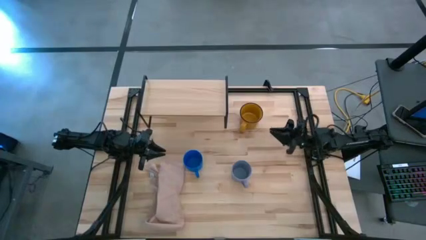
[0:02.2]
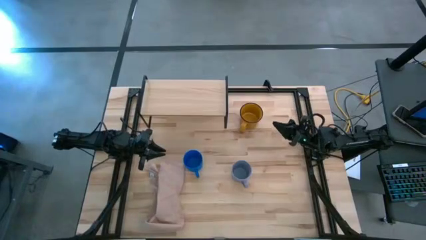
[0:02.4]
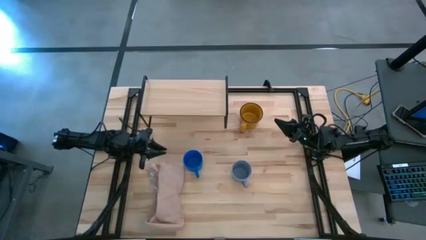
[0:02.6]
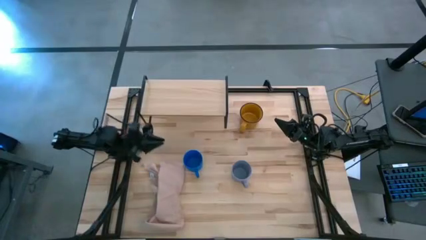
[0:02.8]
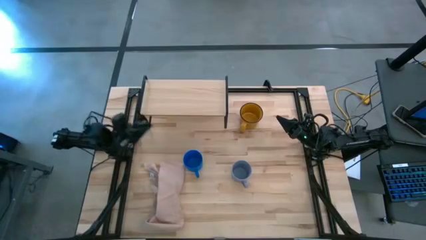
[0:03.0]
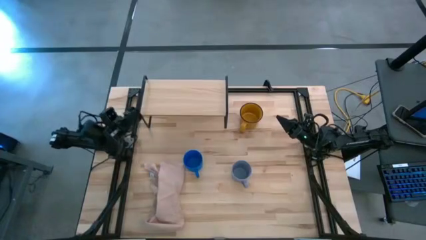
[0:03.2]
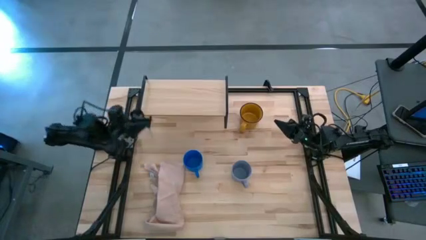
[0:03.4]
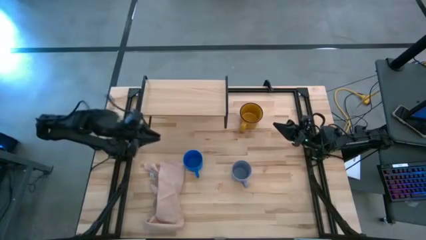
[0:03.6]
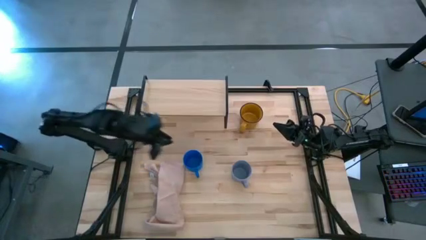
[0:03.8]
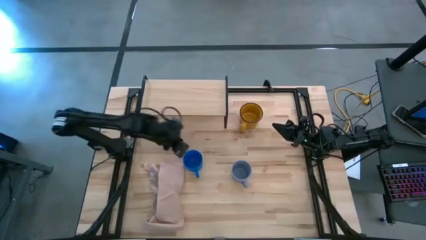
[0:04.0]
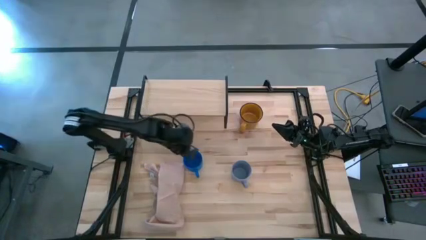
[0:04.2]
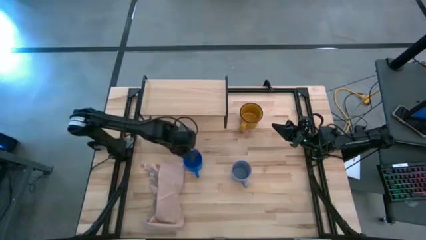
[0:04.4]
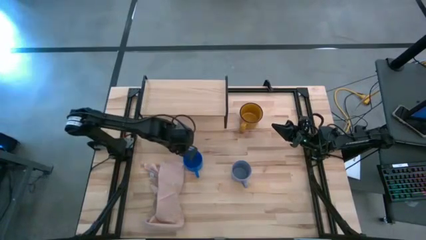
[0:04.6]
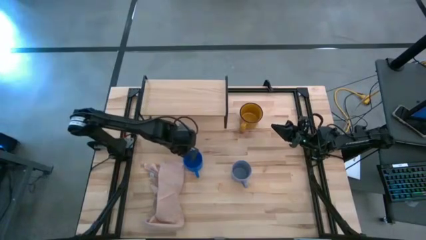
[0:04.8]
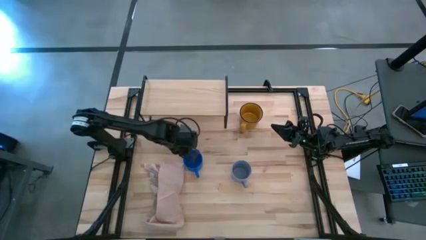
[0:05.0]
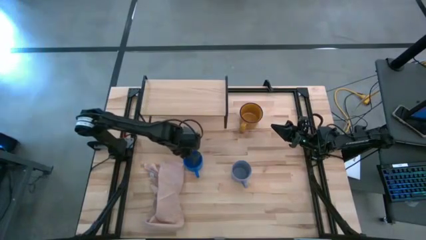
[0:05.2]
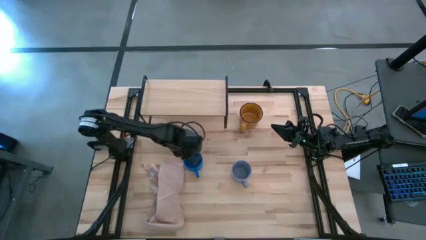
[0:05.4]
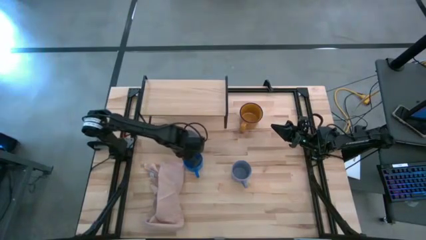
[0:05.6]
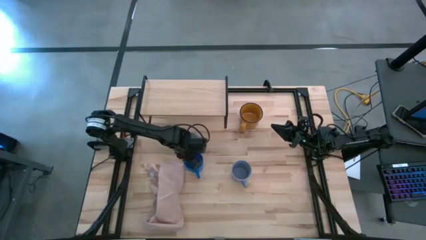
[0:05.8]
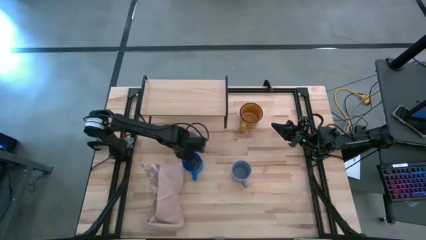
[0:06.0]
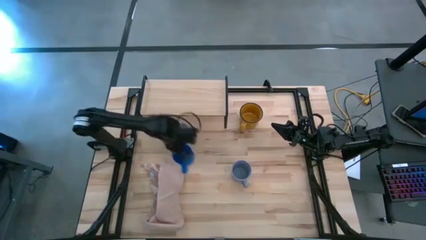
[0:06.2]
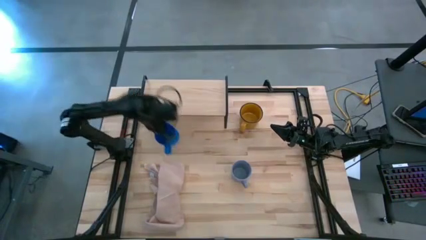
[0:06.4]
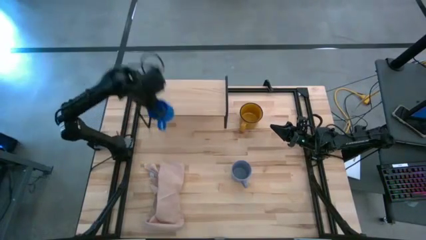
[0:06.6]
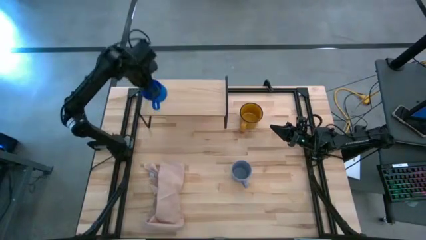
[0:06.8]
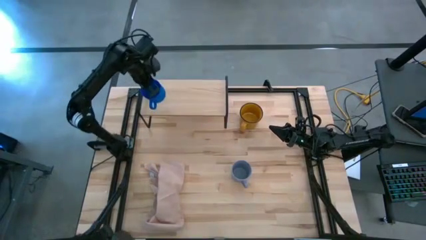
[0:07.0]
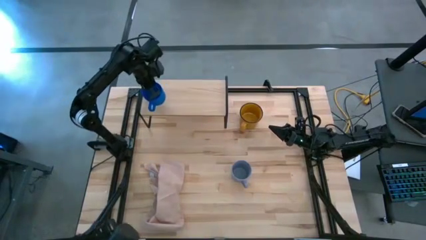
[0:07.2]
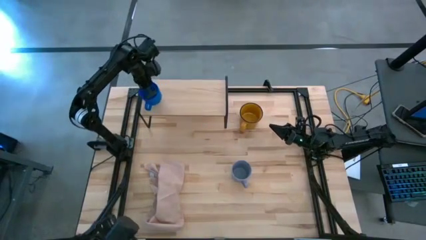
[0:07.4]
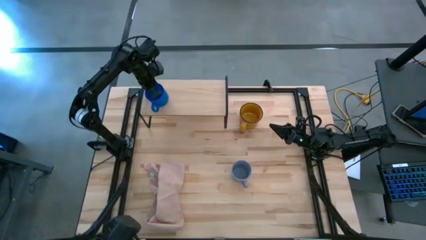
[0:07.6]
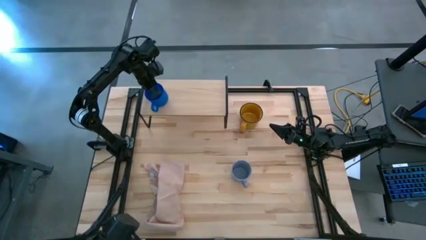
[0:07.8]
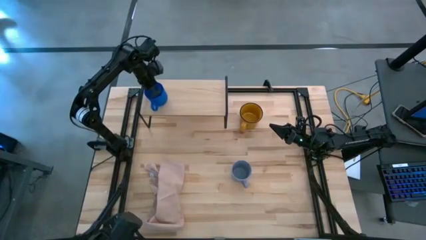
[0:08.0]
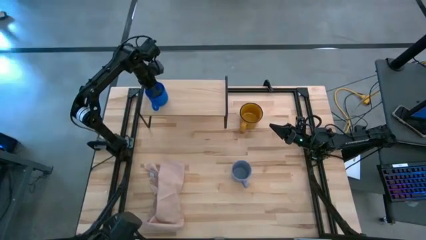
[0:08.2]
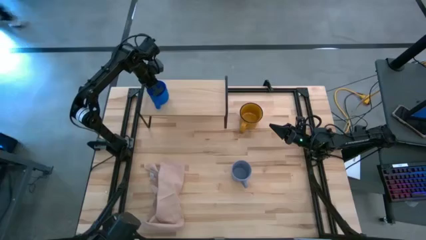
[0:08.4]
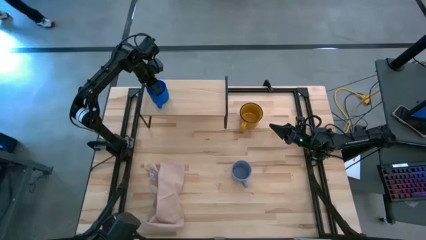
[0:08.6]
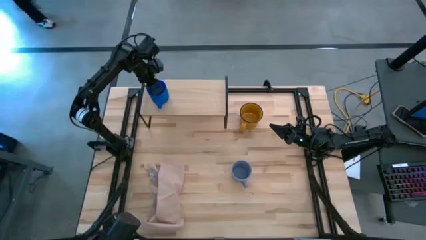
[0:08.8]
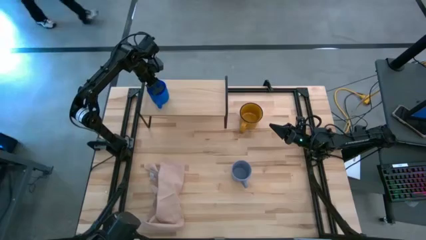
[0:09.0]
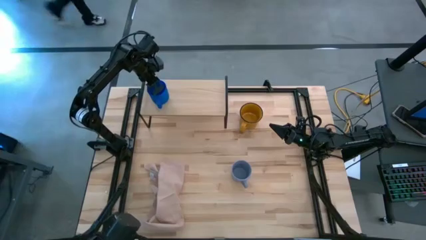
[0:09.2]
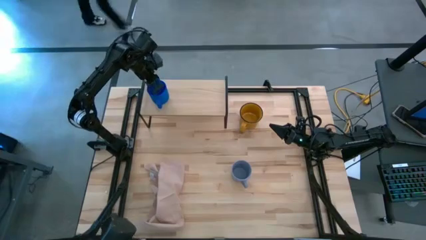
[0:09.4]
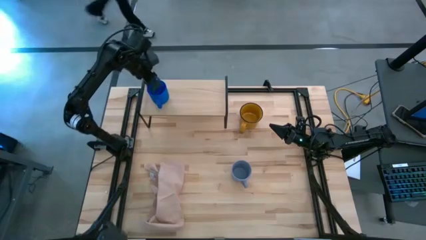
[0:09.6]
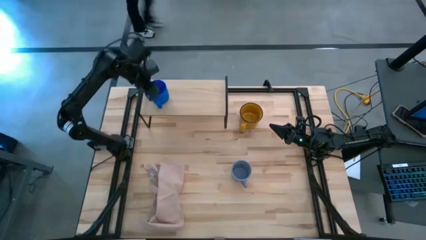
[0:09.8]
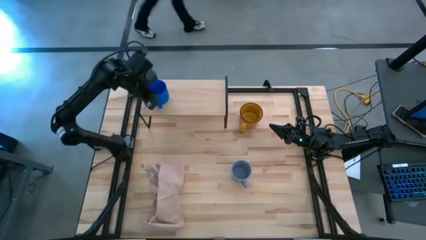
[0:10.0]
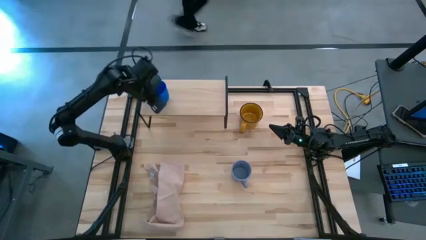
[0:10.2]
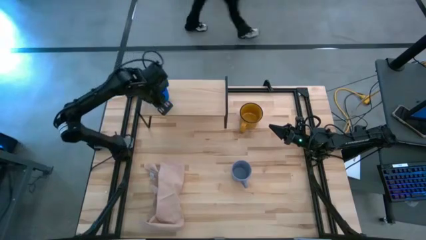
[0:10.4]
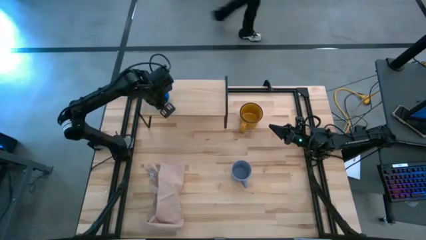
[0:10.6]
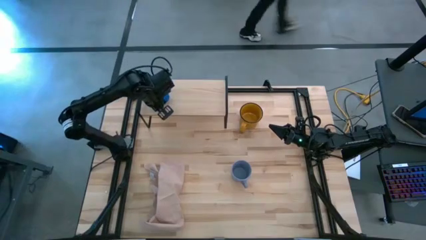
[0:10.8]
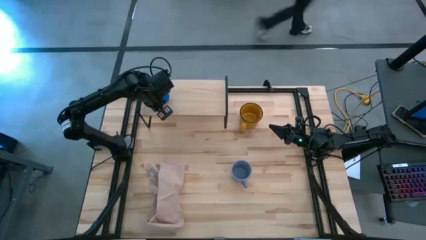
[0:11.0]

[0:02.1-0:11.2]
Task: Stack small to large cups/mugs on shelf
Put the blue mug on the shelf

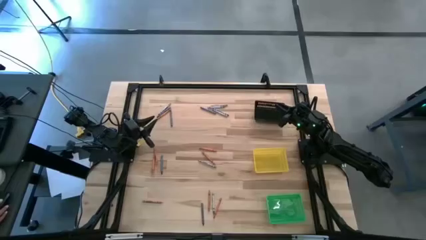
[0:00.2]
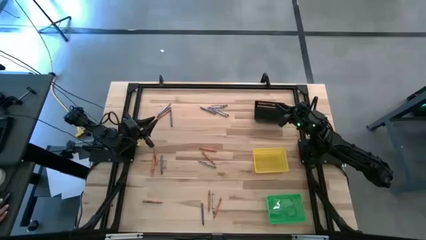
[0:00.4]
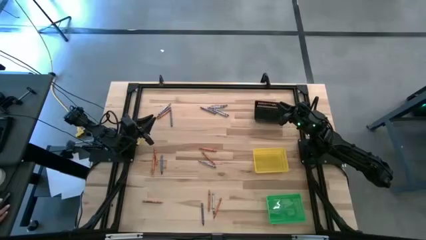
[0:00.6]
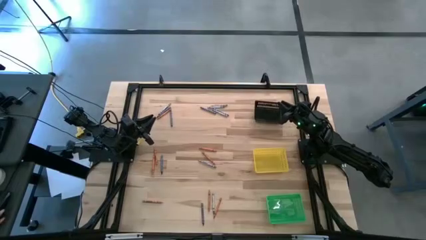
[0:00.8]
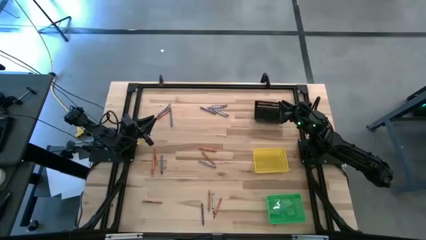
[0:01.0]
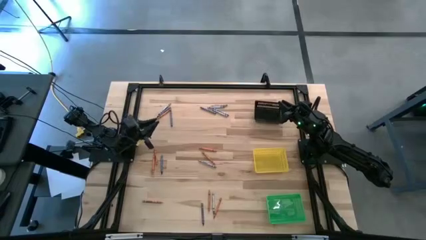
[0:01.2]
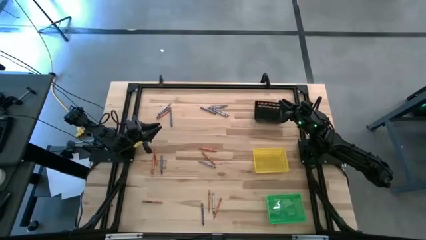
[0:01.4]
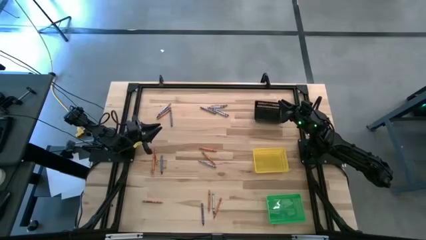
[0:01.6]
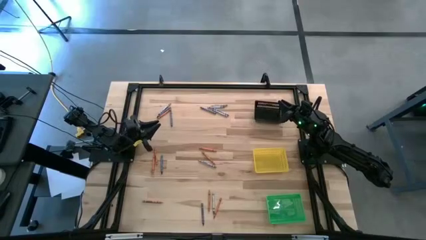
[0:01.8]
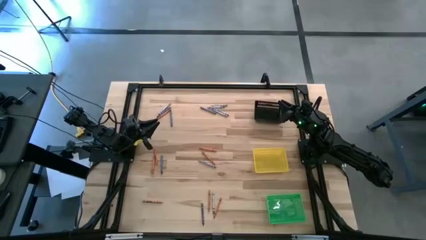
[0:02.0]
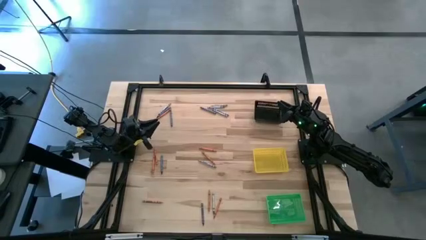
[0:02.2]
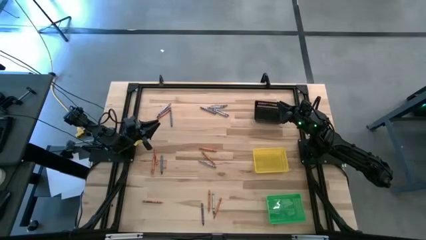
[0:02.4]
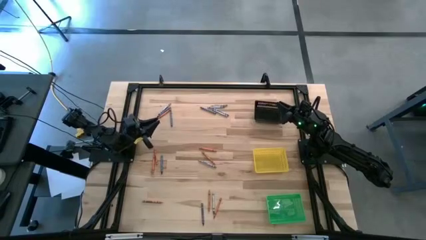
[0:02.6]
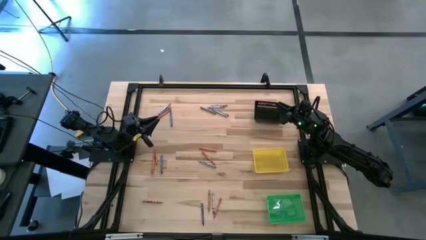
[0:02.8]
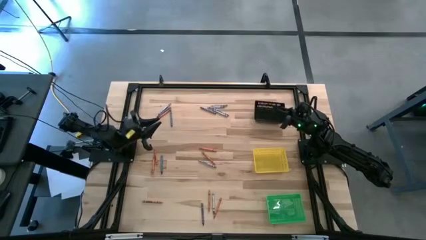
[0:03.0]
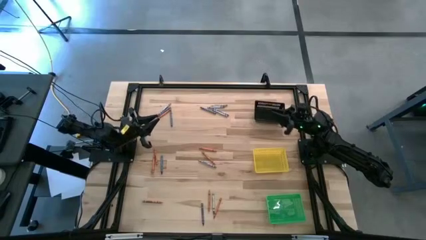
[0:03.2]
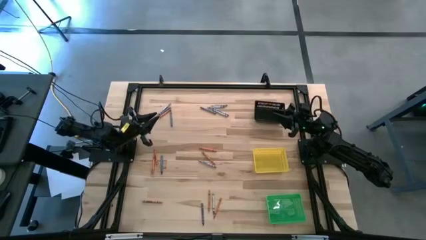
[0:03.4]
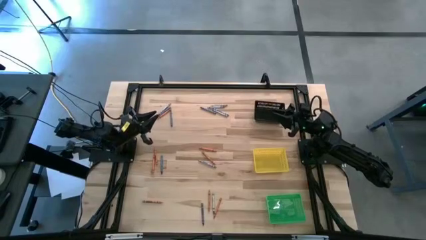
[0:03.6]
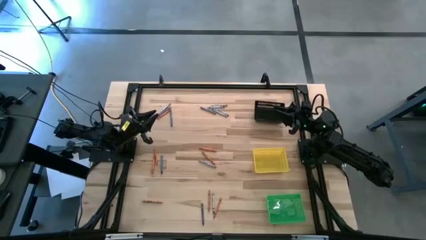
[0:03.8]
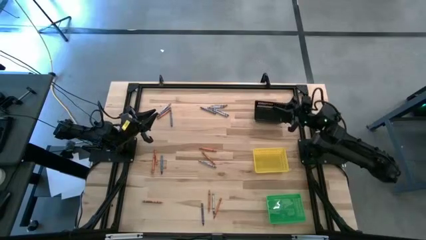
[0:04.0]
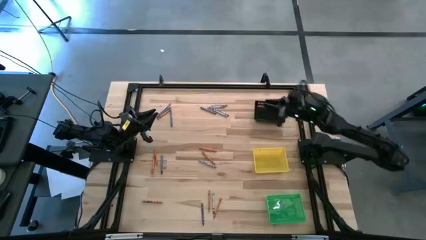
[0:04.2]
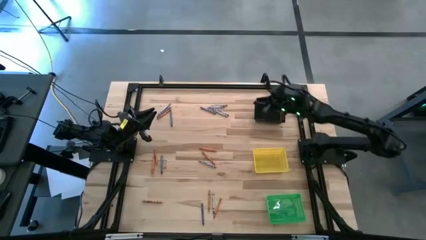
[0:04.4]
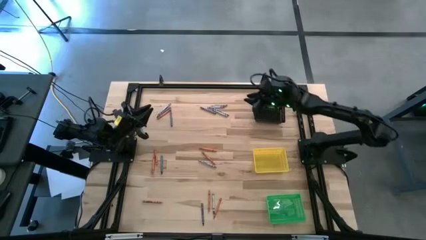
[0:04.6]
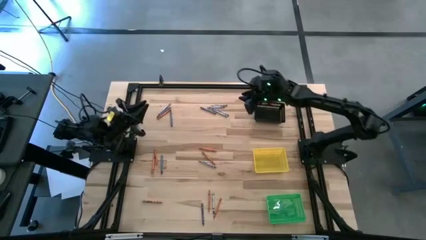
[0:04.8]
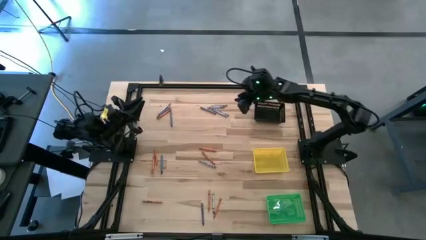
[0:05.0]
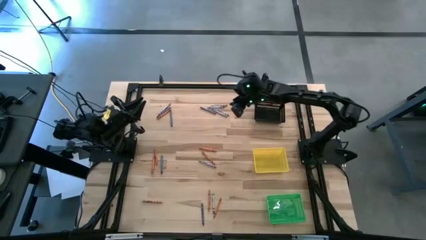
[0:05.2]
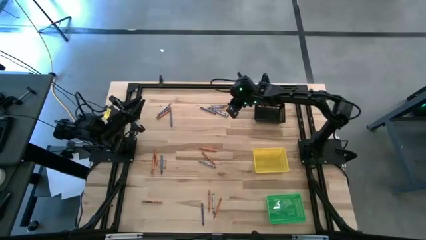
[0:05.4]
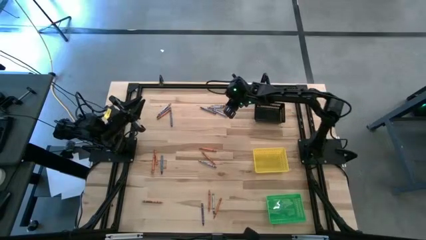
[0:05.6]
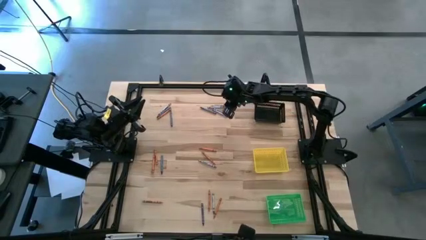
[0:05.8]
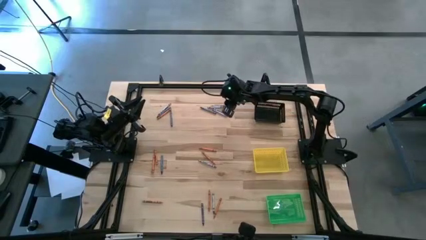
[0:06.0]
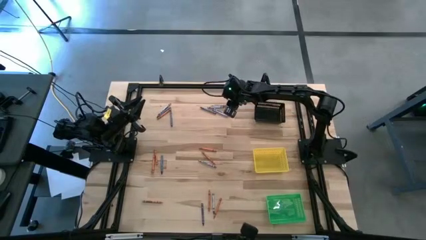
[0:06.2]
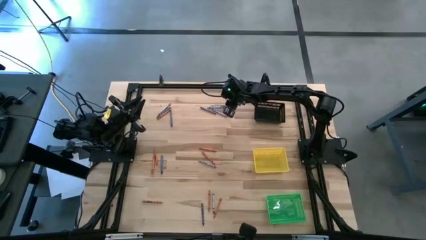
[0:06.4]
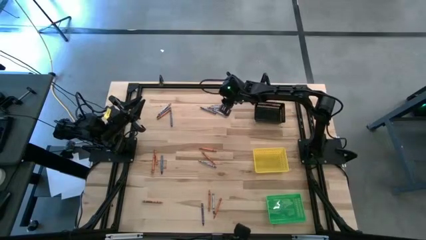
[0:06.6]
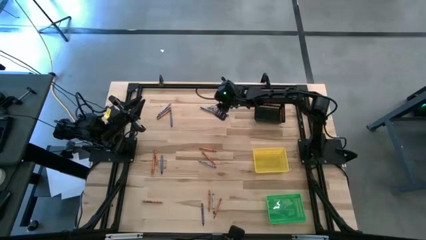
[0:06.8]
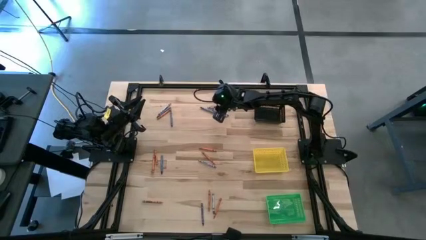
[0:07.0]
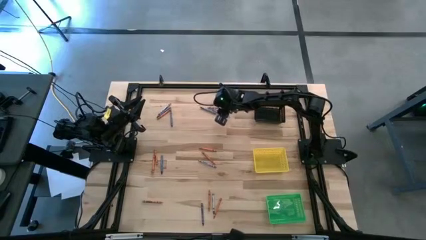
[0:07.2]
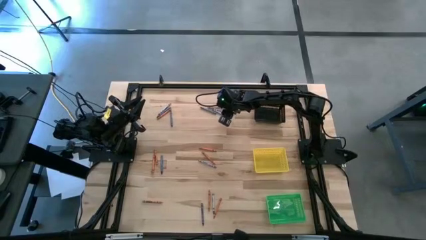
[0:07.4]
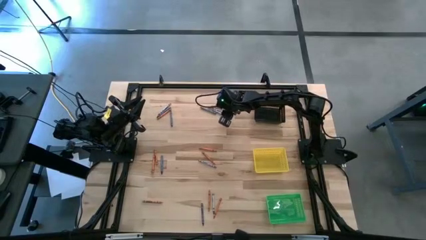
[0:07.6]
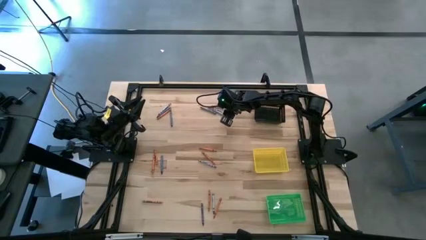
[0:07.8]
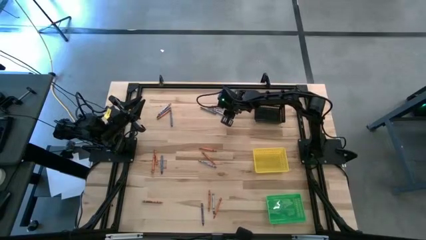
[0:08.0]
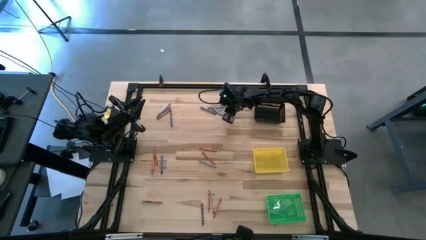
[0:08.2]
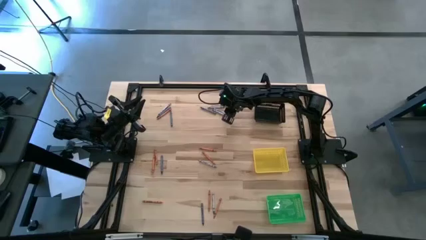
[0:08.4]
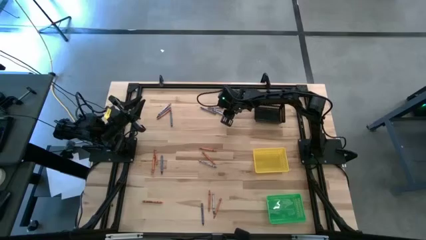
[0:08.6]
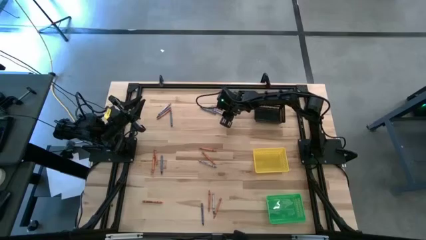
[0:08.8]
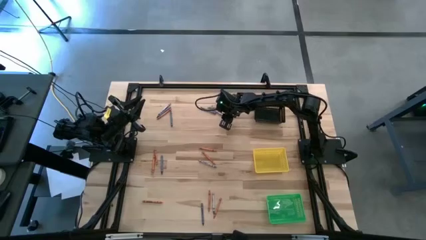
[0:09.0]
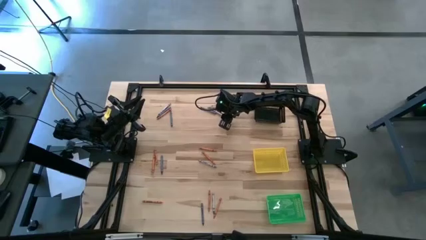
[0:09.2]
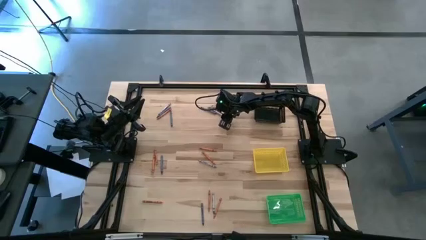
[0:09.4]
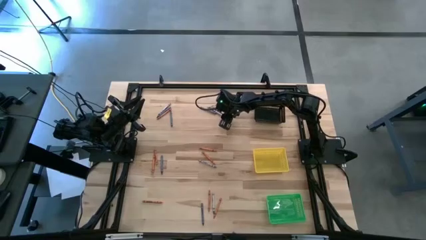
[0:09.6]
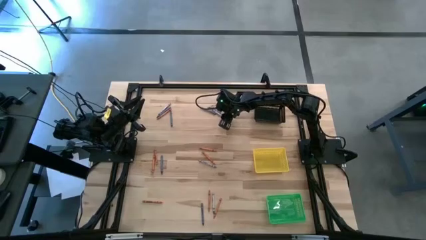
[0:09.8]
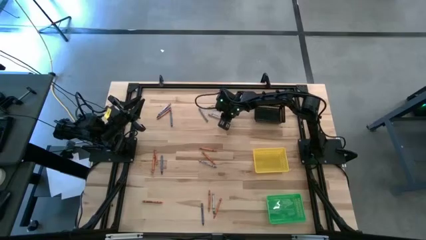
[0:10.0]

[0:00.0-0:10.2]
Task: Sort crayons
Put the gray crayon into the black basket
